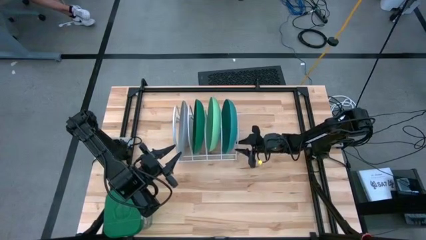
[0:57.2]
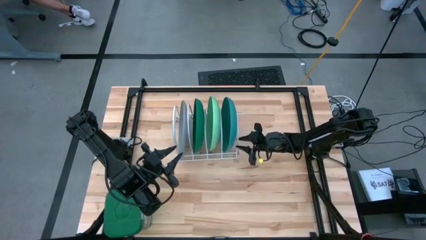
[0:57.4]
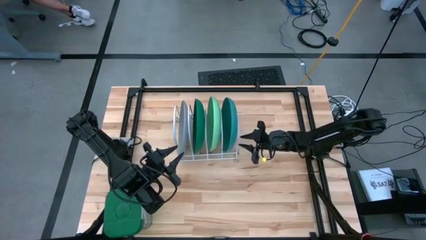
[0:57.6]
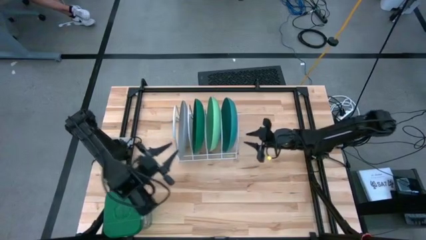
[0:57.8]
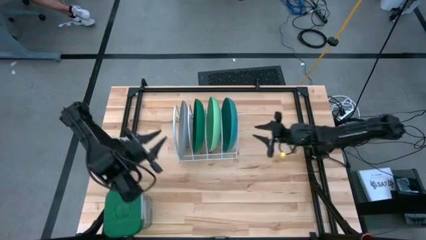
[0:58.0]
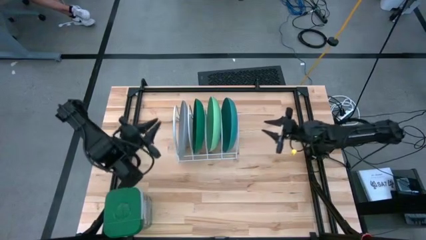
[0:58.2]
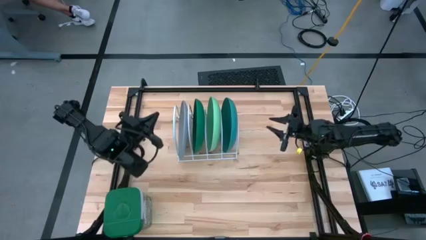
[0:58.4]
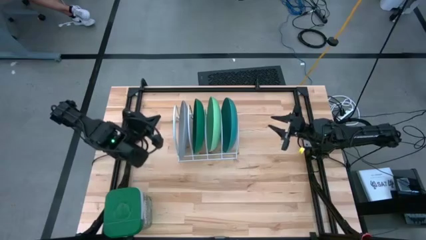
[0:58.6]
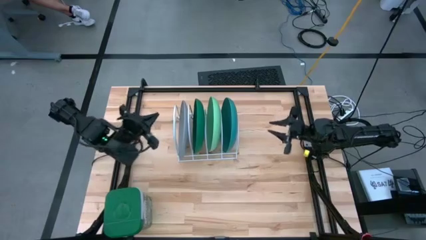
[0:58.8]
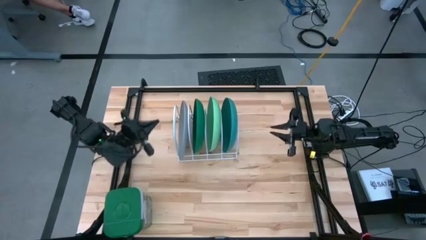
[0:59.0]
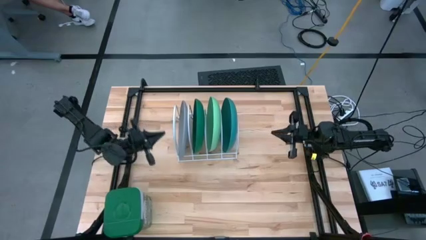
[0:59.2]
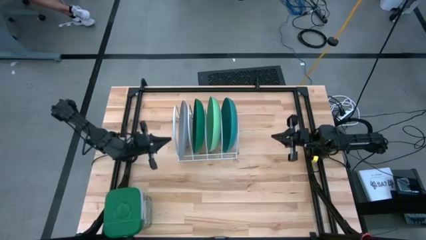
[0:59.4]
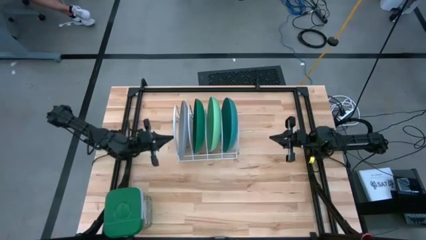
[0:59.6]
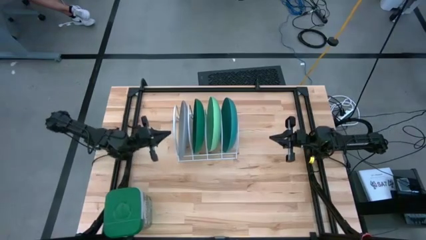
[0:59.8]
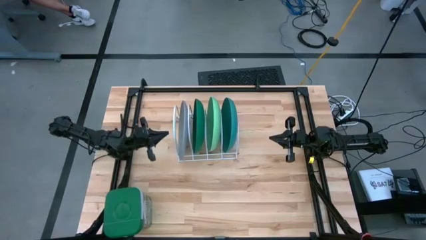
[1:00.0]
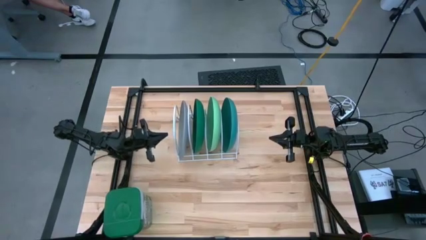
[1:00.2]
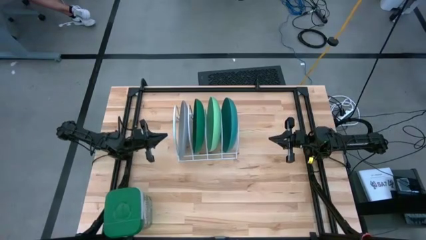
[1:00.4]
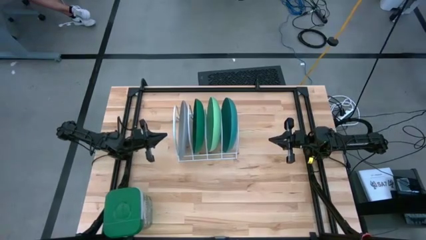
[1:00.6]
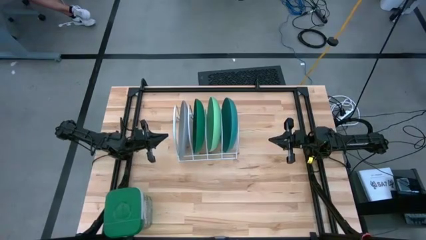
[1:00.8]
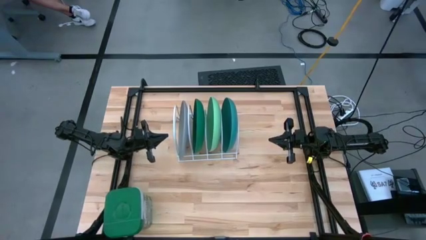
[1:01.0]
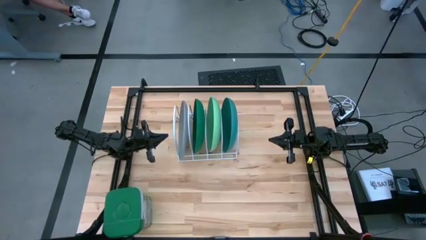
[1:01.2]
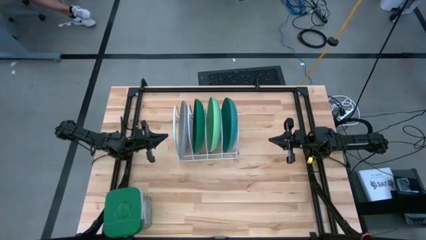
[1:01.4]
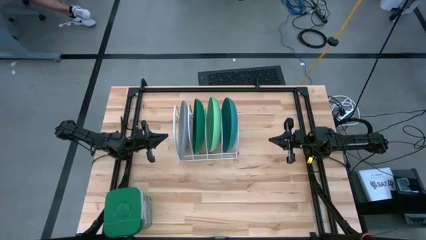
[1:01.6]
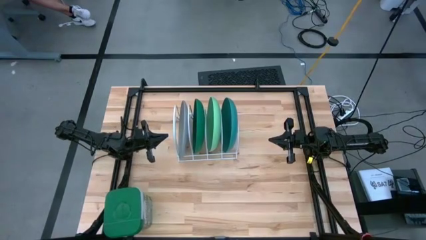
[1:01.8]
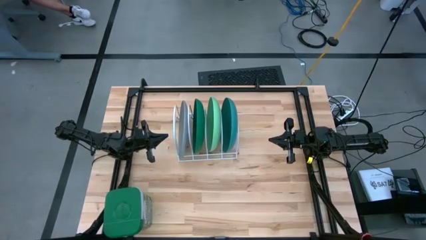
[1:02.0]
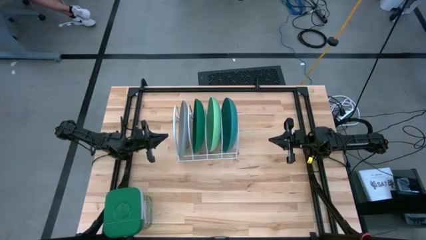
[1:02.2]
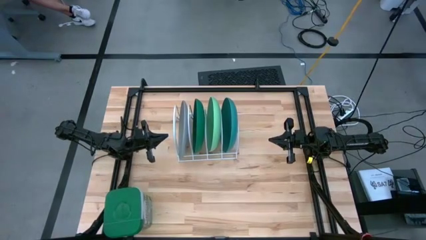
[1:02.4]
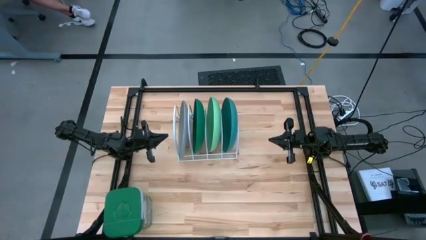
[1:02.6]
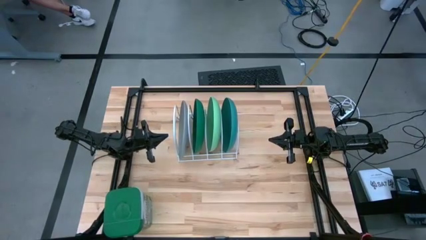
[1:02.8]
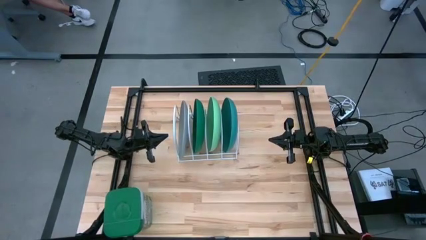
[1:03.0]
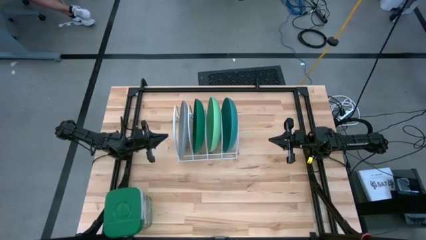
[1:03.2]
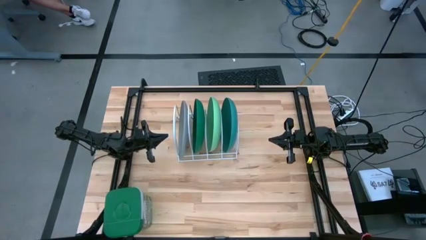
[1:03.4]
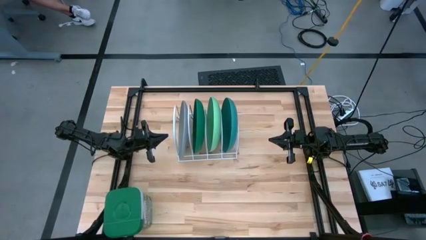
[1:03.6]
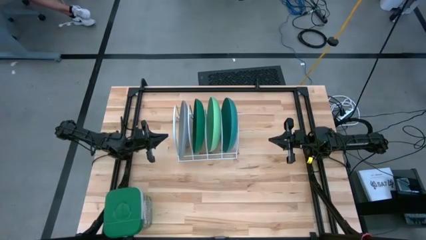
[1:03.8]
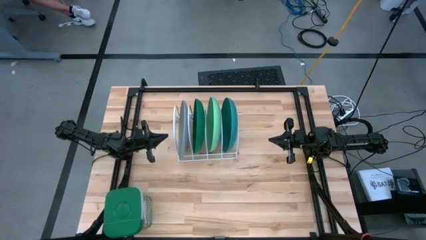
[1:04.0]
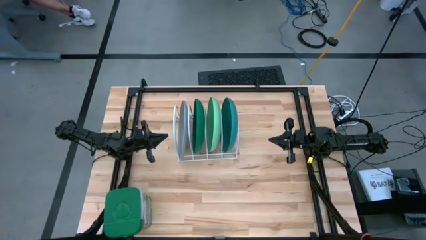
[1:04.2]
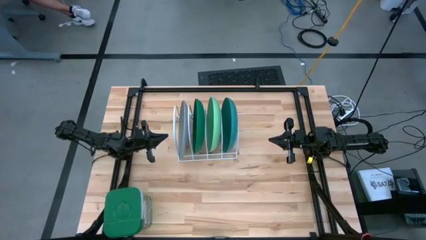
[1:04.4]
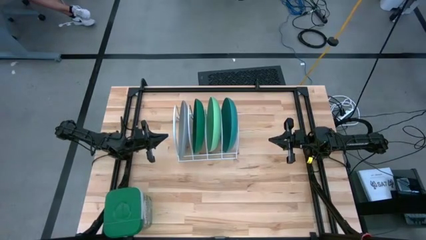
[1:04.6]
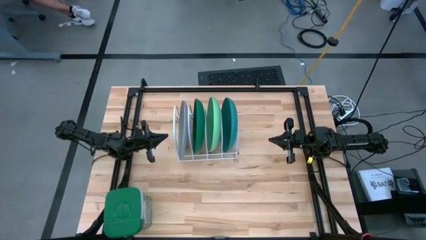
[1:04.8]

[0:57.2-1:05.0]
Task: Sort dishes
Return to Home Position

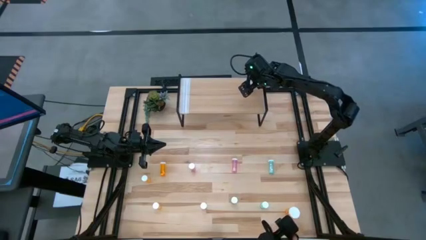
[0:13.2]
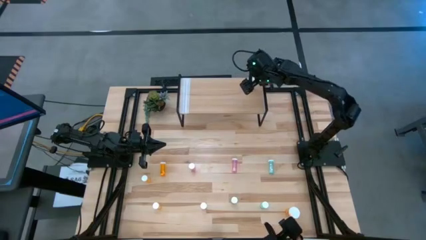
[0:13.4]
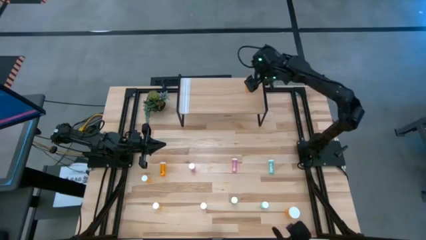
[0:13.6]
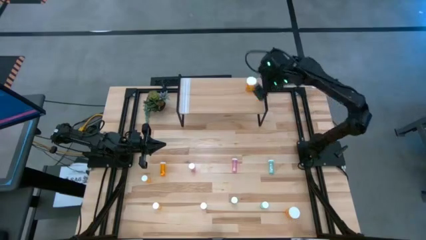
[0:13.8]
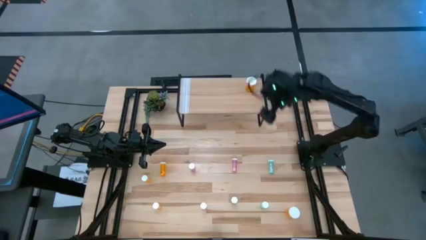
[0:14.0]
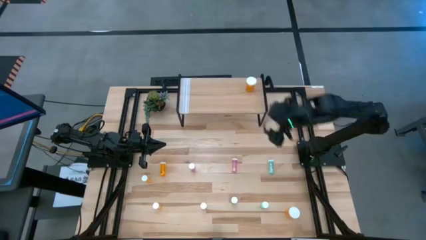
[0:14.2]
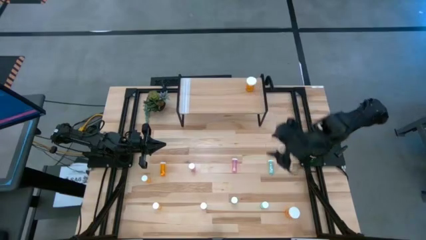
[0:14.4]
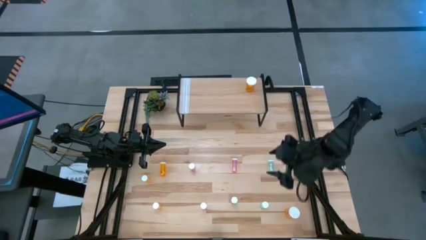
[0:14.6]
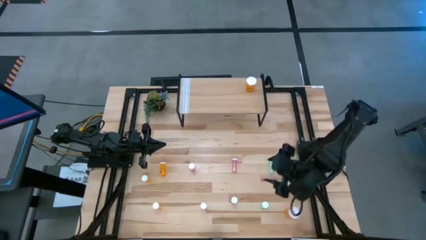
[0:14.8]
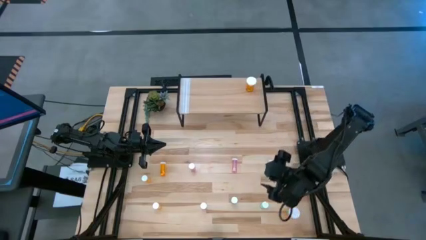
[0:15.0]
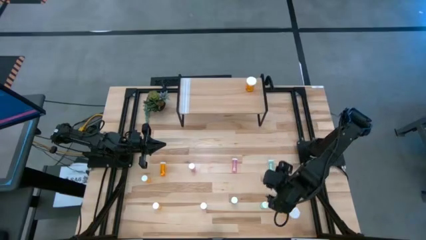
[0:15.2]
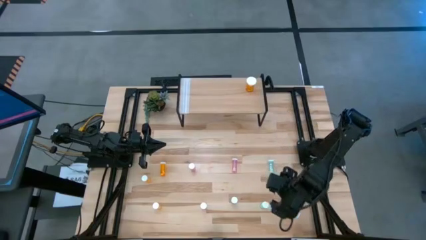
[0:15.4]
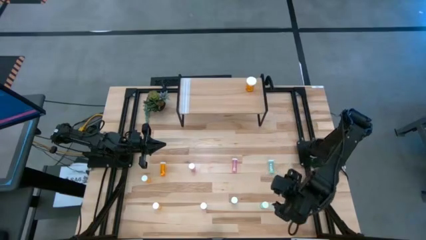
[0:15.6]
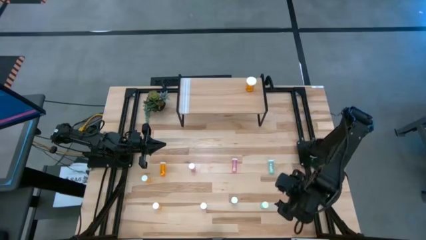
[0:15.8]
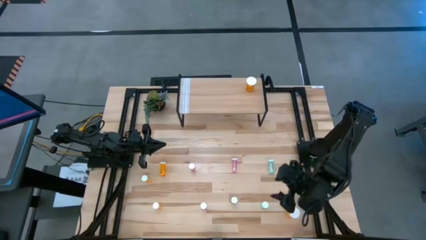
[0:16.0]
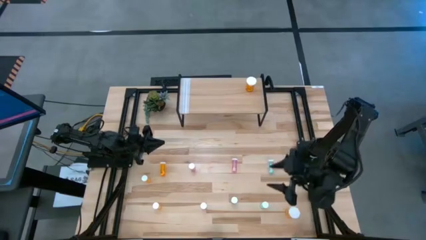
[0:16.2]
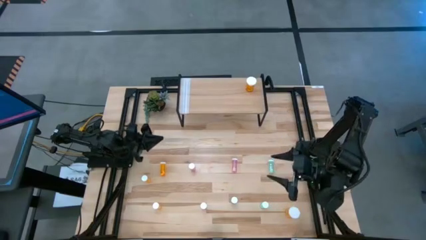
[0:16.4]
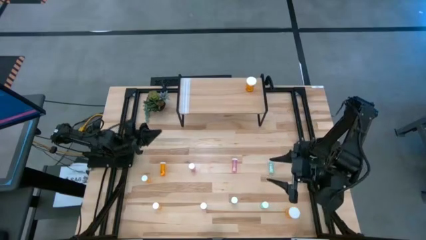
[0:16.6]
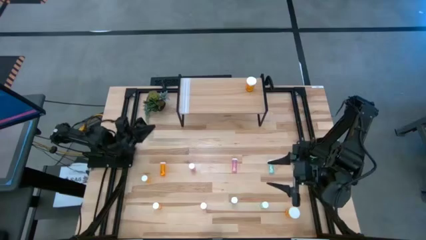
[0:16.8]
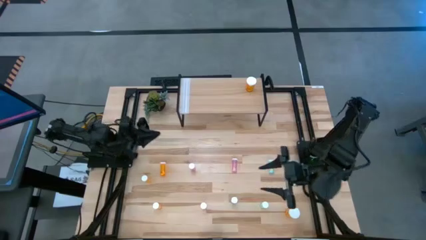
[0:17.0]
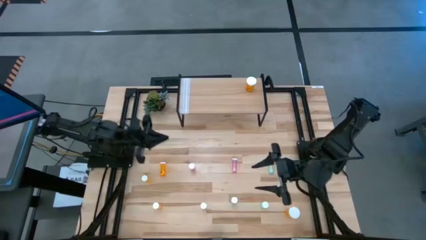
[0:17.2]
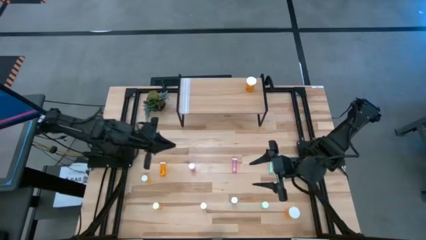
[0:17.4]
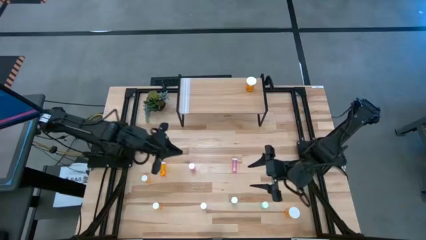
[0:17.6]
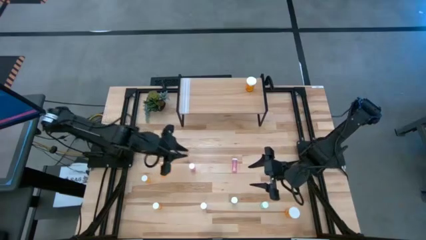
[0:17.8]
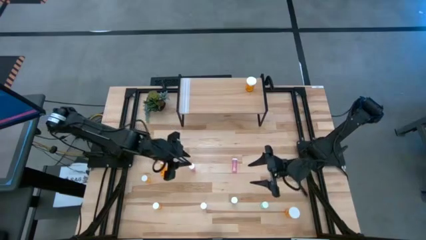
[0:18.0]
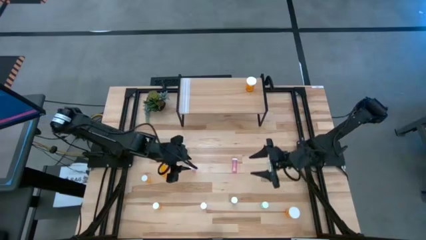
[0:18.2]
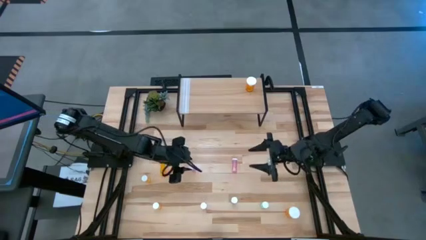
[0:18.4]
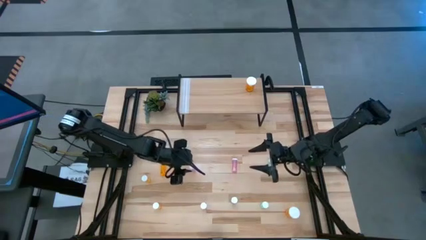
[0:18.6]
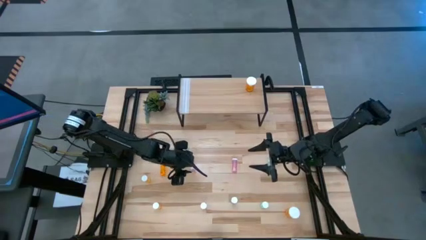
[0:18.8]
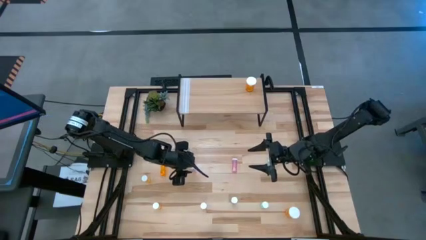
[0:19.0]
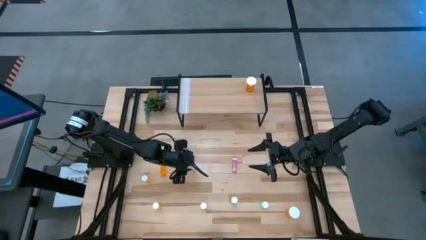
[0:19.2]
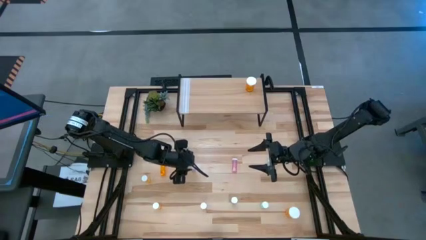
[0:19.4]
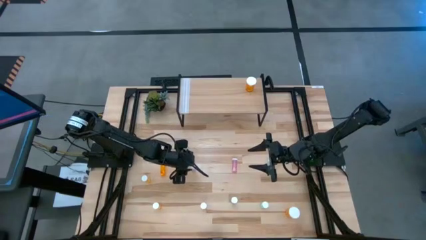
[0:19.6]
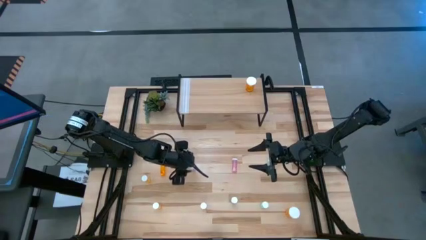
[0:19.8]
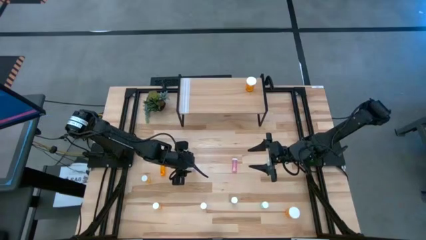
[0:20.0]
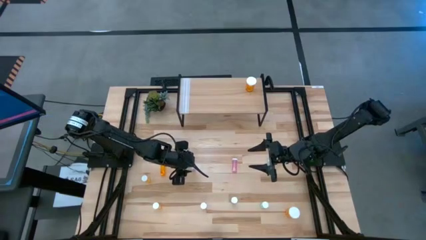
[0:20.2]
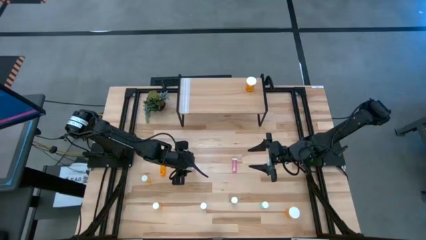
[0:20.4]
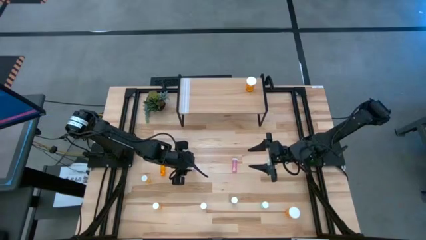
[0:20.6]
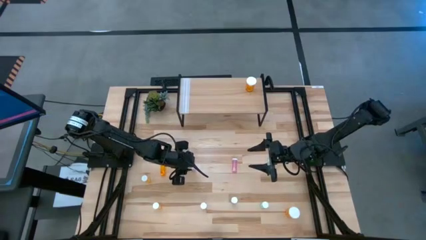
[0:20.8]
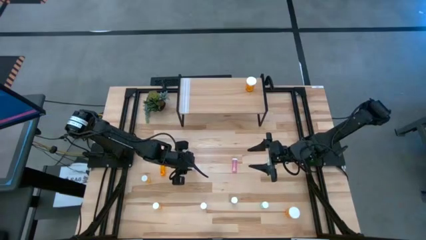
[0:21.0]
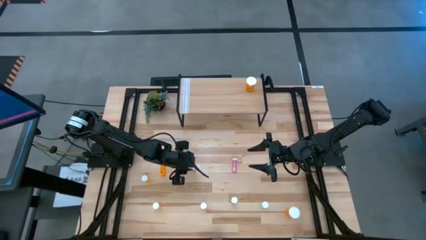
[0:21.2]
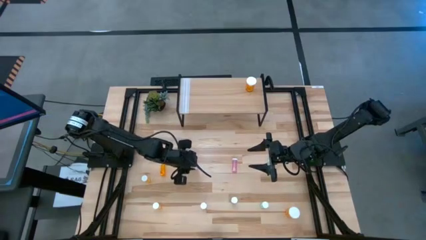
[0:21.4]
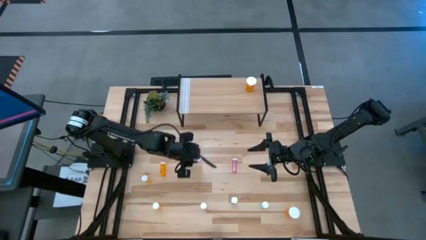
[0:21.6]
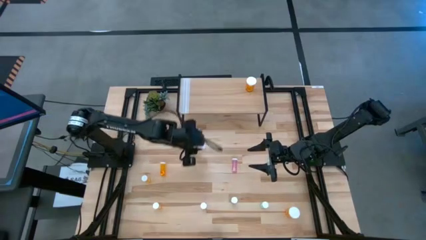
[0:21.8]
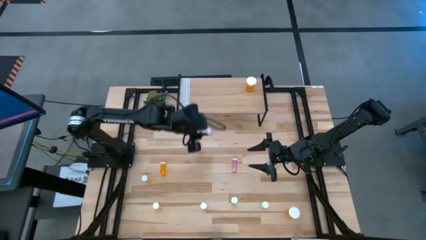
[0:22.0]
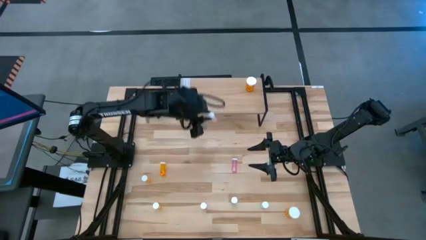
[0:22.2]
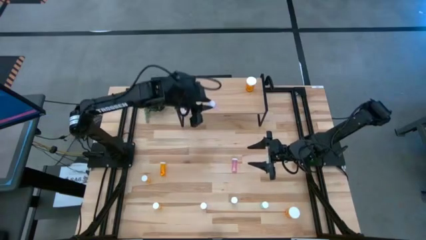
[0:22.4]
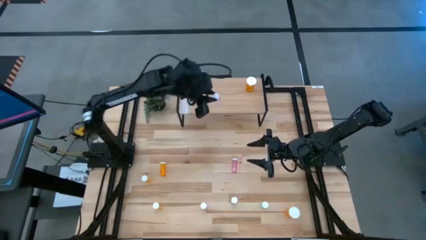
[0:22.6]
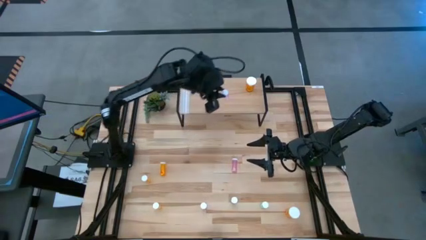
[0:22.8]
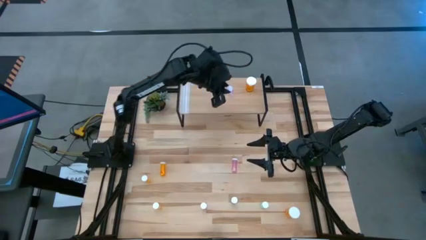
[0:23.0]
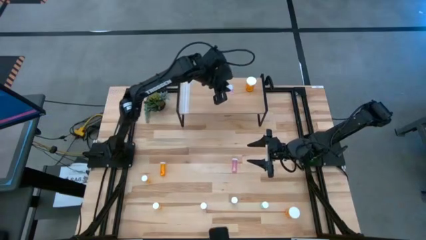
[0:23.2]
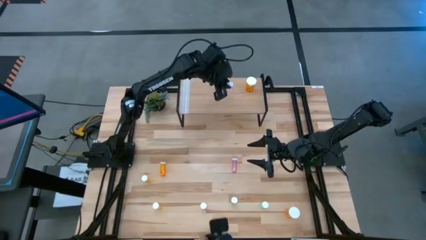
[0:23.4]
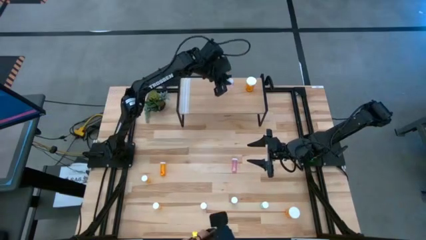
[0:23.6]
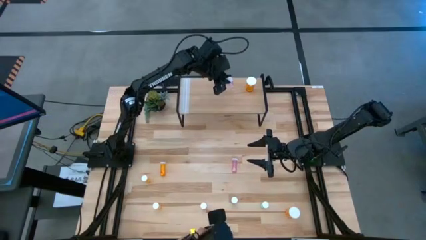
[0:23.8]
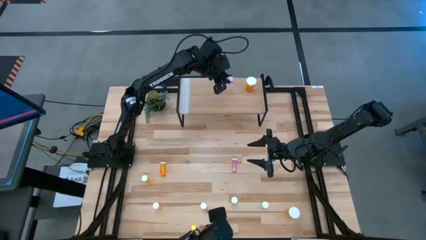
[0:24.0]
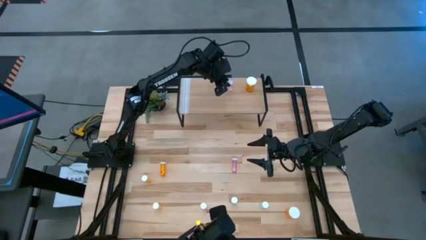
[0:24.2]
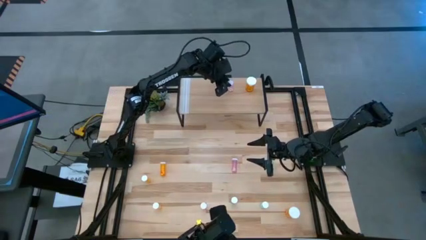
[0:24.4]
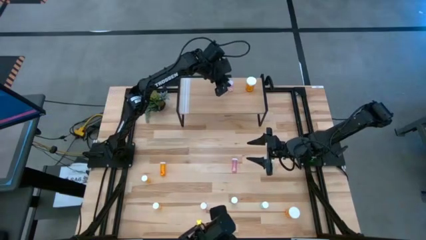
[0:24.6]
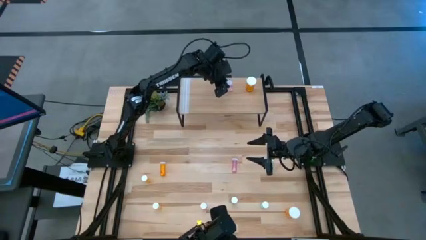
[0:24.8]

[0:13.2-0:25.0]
Task: Pick and place medicine bottles onto shelf by color
Put the top left pink pill bottle on the shelf
